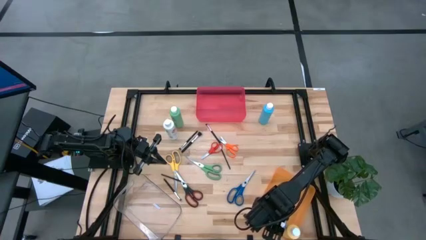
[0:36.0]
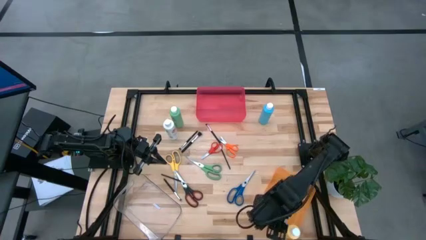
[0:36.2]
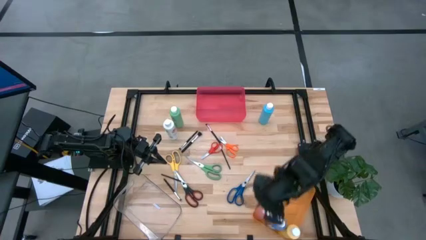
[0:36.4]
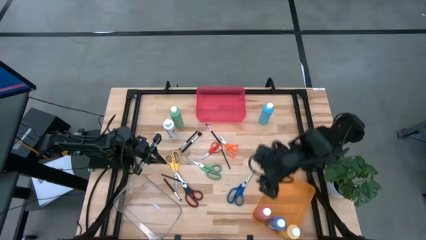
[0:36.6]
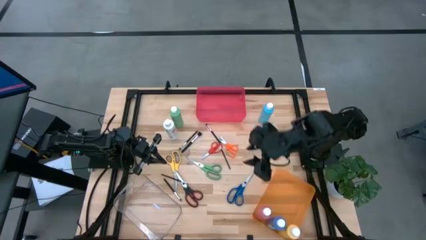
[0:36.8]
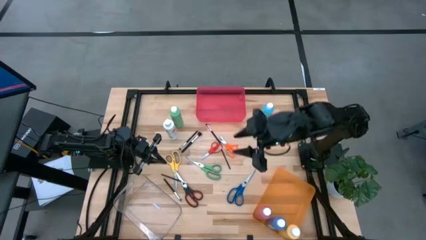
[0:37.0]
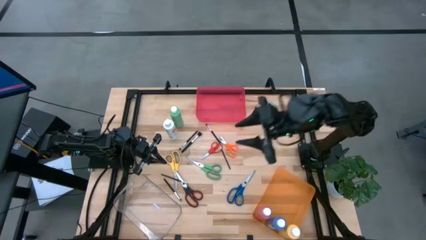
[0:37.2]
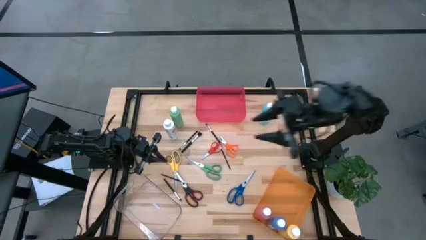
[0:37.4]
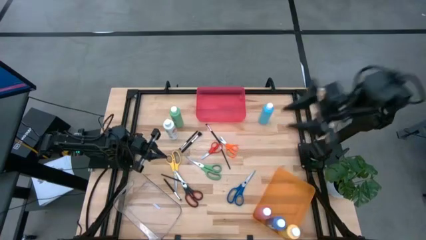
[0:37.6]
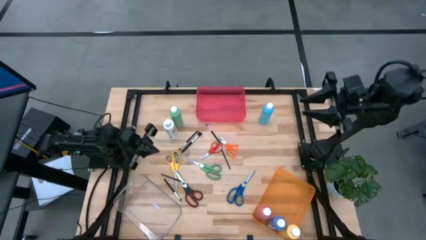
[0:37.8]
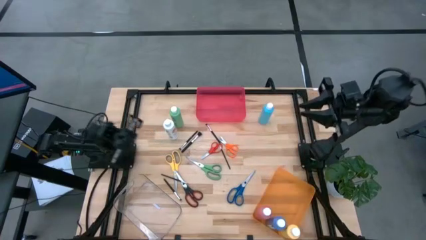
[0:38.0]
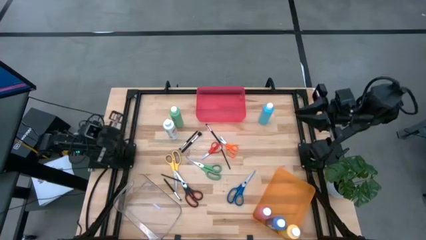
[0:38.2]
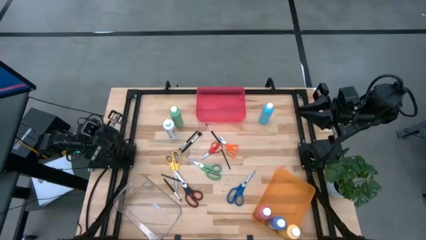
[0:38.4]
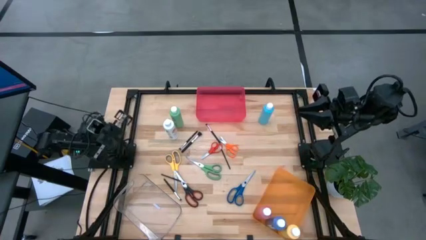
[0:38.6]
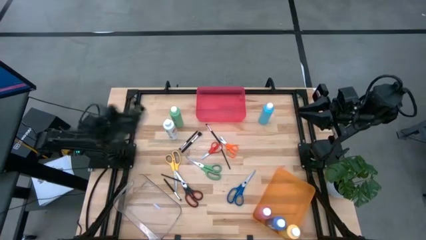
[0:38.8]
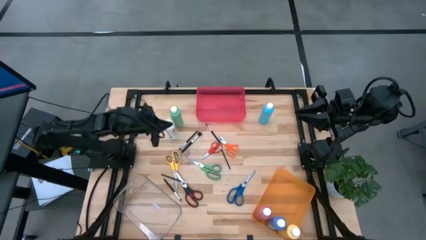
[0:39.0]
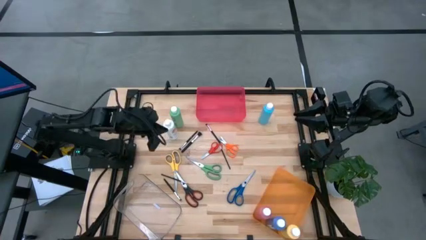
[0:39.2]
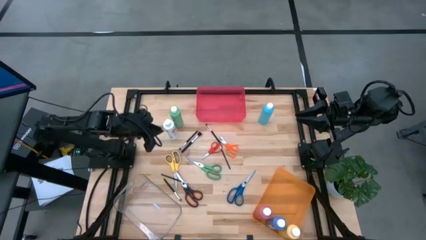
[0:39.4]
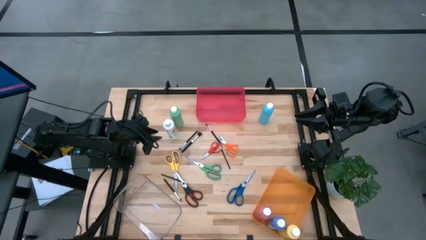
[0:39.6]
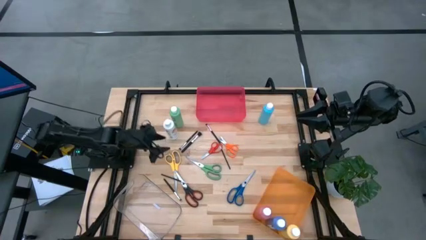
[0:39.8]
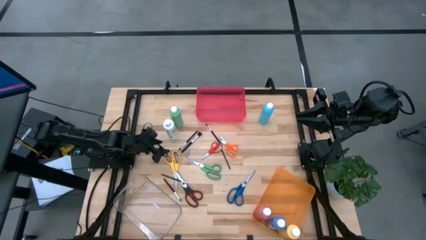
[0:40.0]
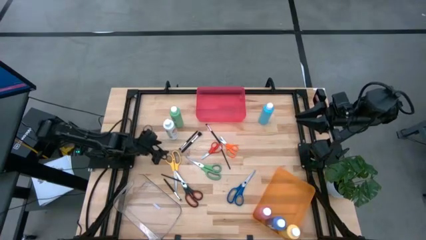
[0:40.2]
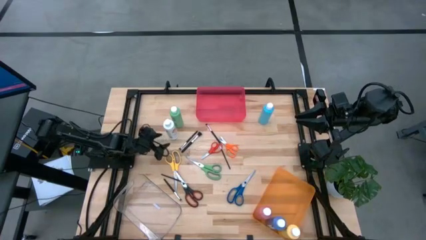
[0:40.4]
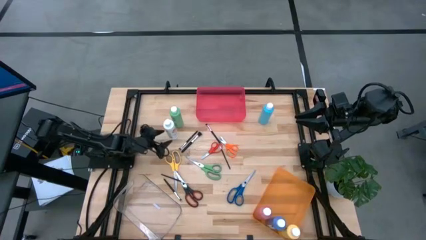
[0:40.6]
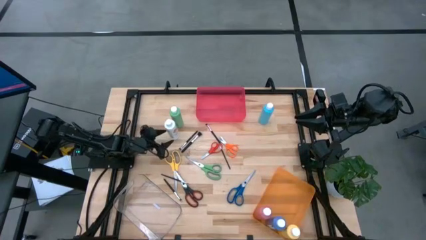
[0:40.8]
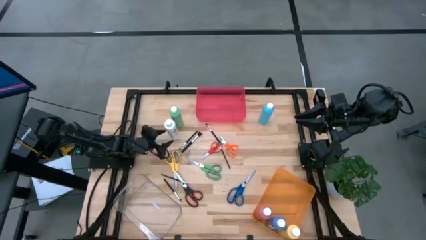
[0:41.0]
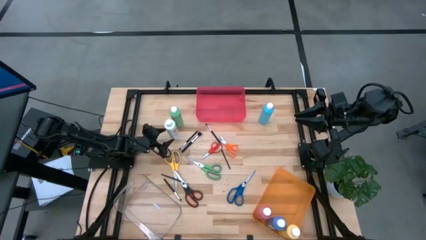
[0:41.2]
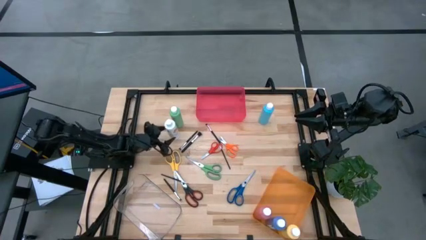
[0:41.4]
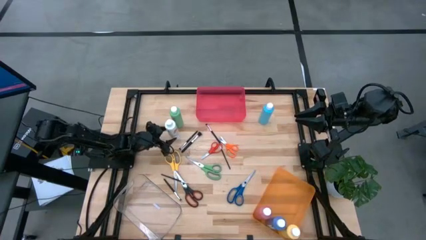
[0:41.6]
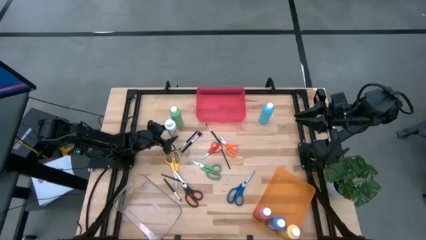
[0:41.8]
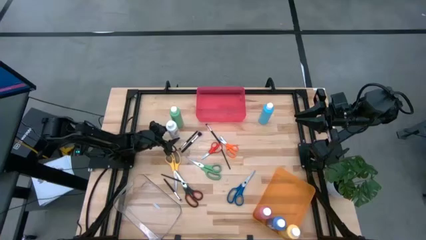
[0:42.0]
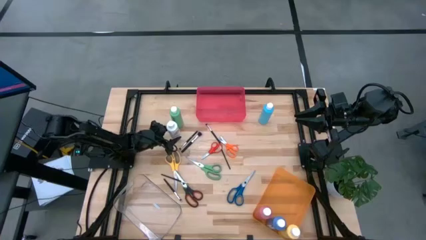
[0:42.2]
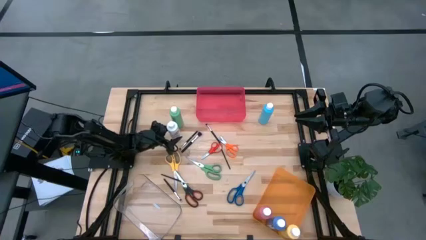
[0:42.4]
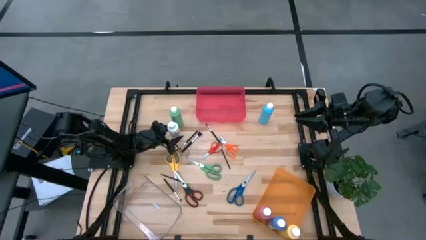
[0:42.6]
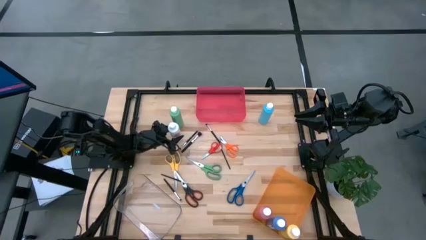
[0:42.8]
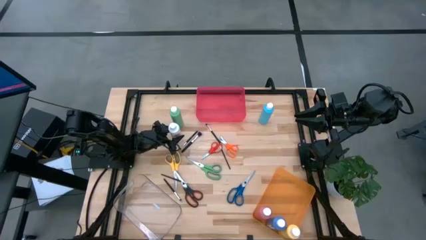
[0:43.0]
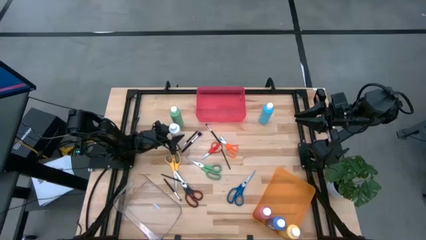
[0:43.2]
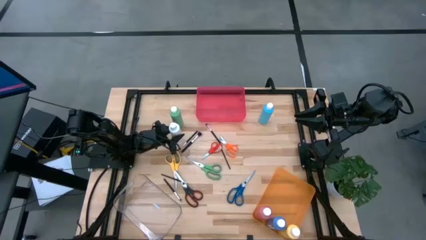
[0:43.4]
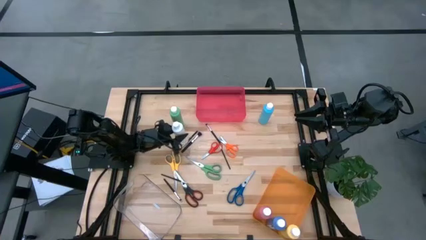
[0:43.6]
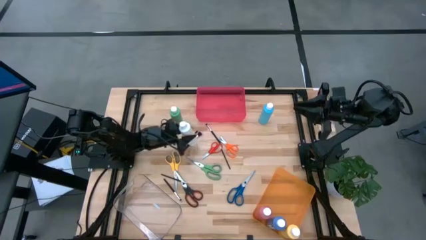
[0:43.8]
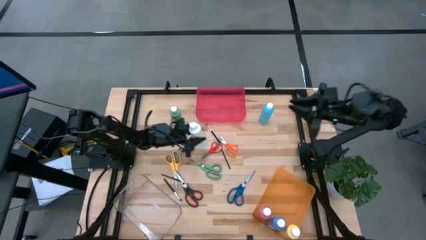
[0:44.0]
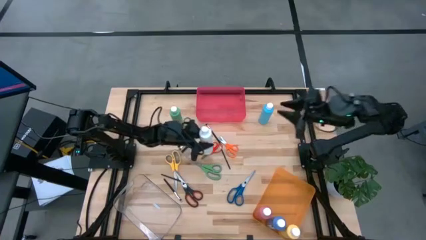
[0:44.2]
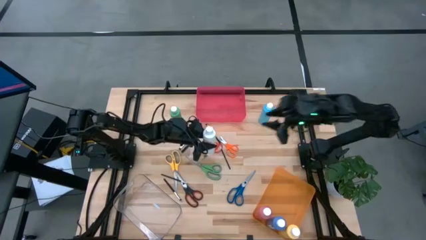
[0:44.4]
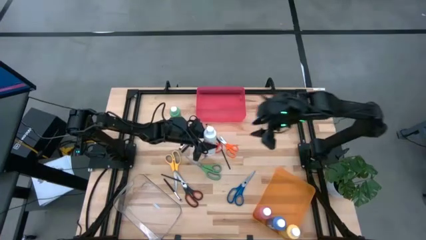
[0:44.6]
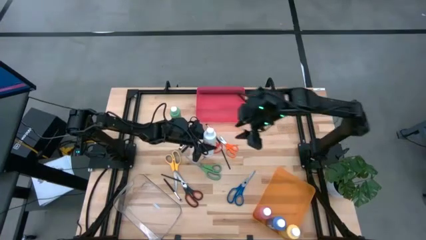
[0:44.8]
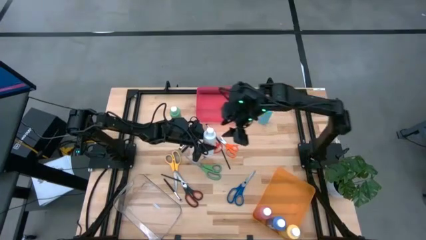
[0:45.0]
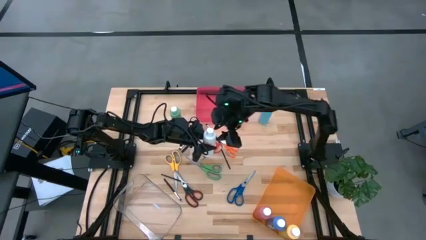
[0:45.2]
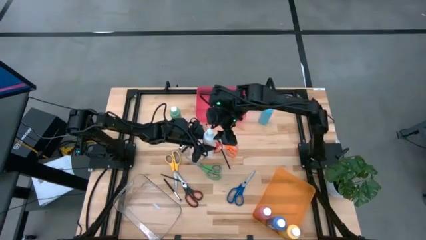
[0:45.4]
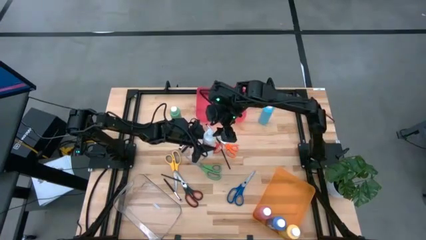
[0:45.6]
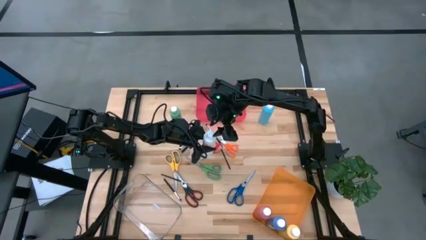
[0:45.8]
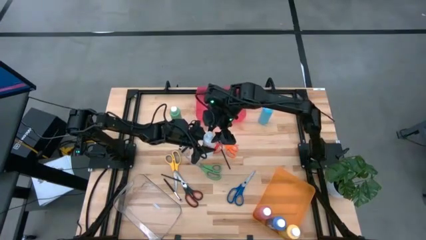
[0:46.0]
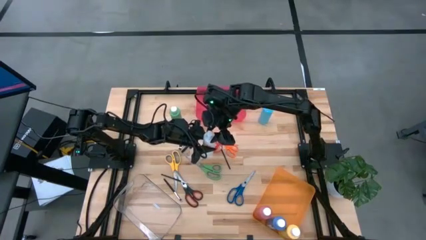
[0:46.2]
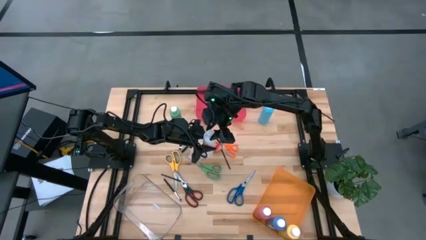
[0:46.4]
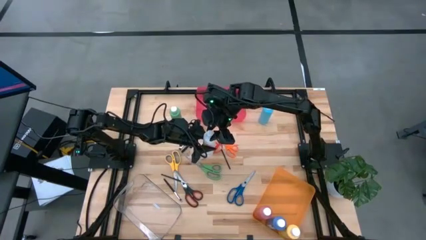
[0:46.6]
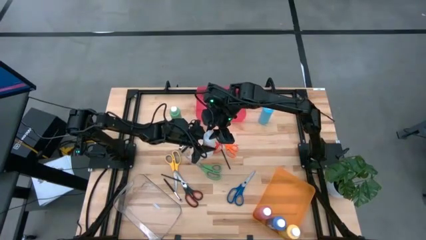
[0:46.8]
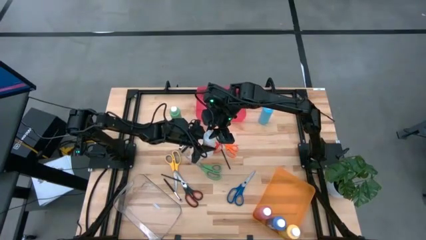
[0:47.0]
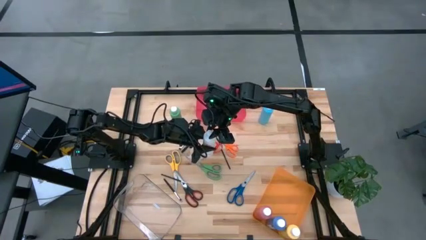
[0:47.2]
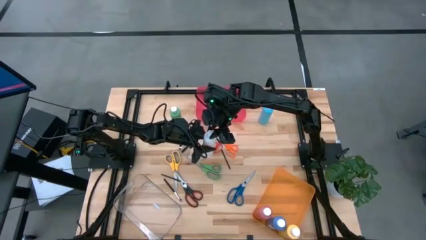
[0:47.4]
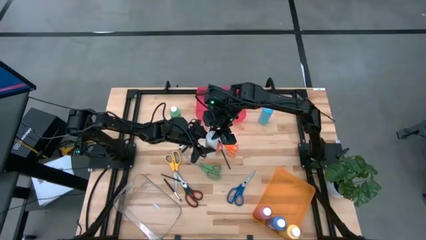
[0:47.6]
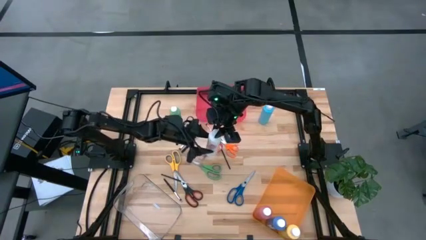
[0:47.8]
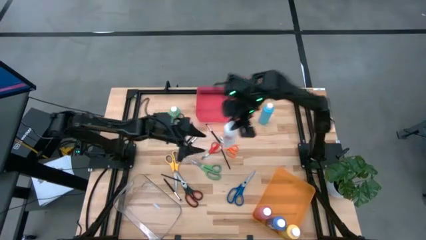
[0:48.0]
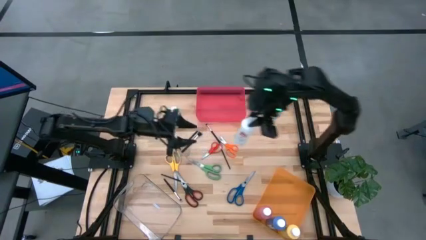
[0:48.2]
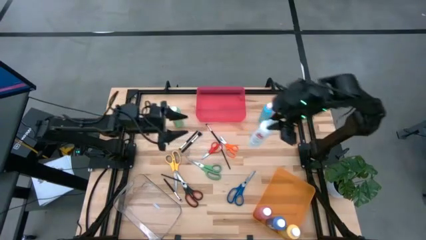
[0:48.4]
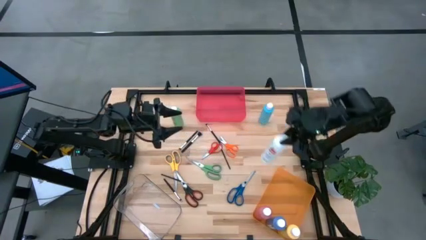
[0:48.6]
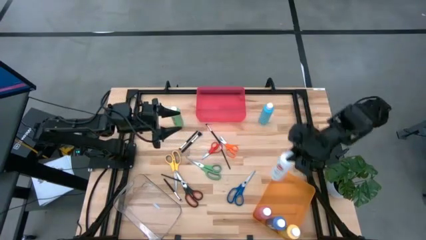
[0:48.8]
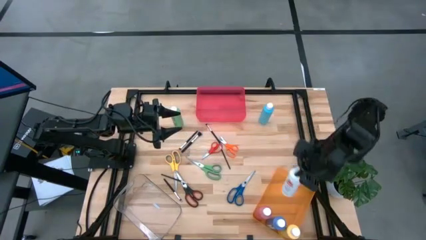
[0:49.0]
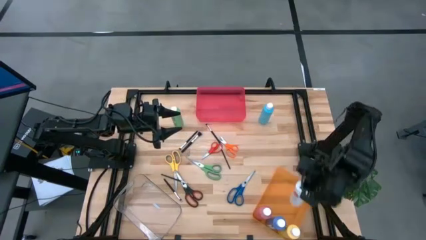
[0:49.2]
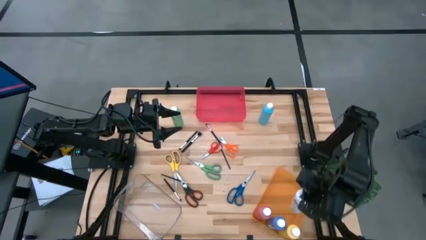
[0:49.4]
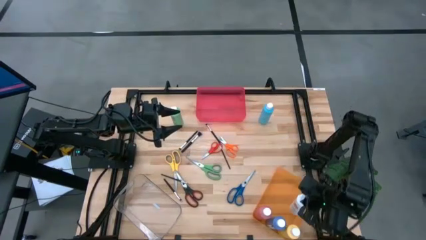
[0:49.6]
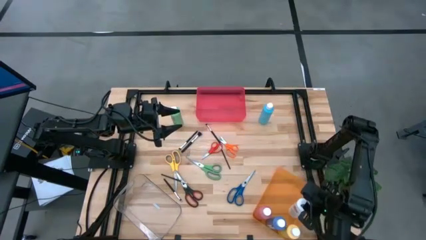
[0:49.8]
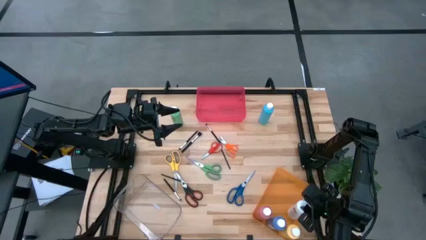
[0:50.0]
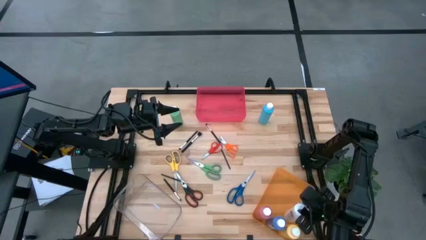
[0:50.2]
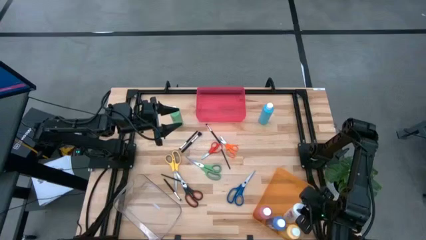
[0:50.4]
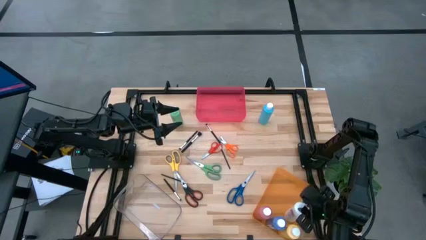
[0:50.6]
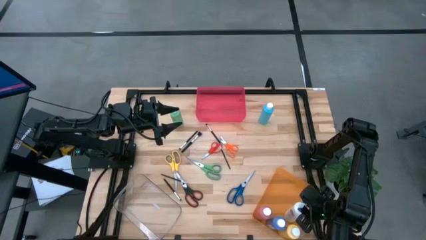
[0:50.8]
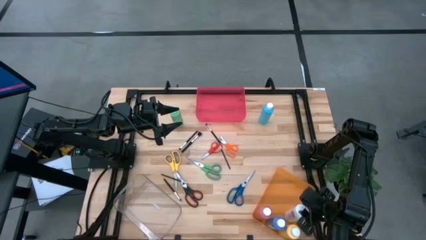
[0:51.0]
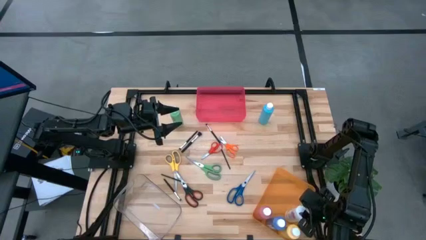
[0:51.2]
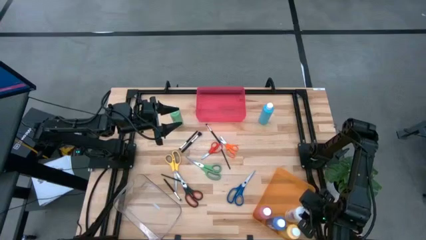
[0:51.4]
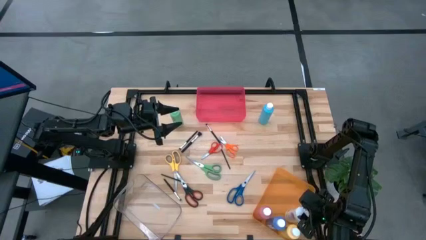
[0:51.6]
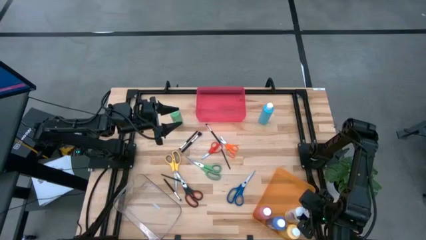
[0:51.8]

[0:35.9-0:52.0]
Task: Pick & Place Paint Supplies
Put the white paint bottle into the orange bin

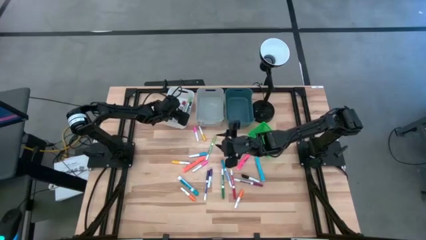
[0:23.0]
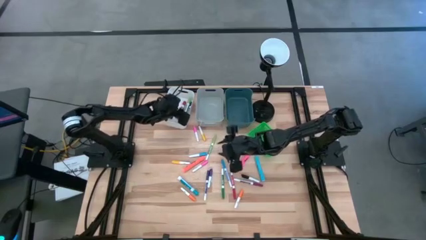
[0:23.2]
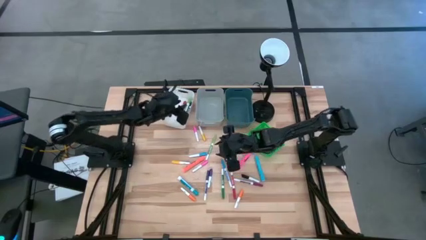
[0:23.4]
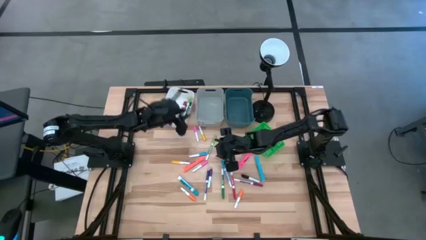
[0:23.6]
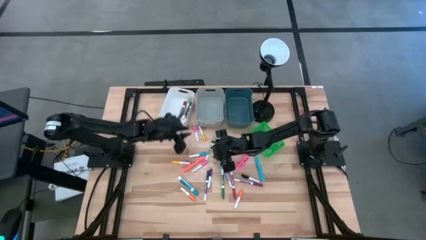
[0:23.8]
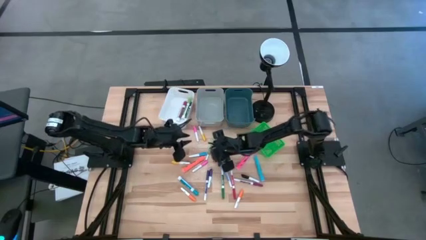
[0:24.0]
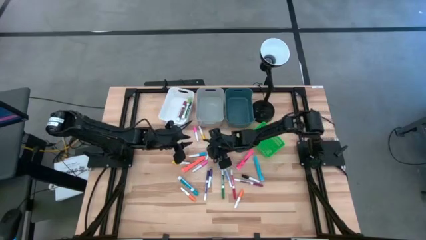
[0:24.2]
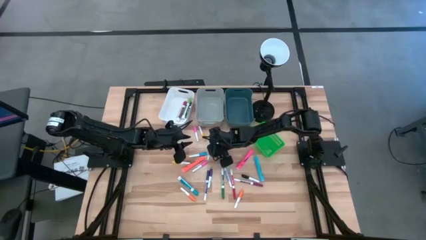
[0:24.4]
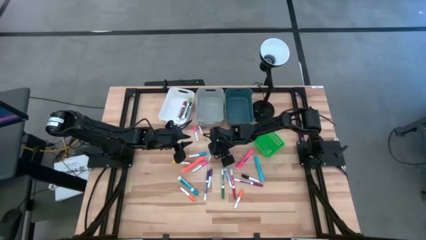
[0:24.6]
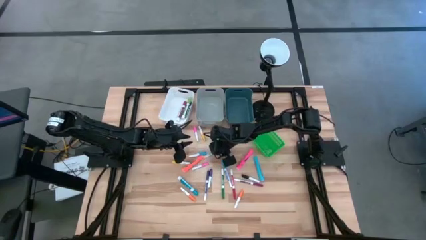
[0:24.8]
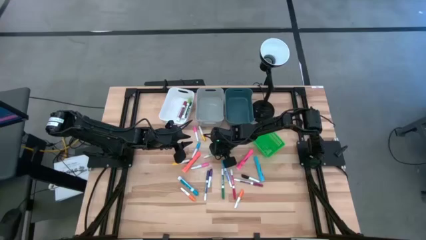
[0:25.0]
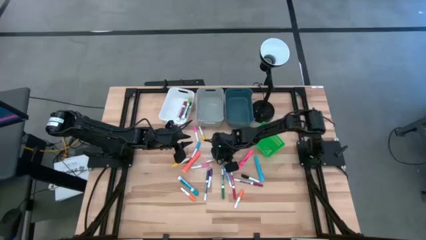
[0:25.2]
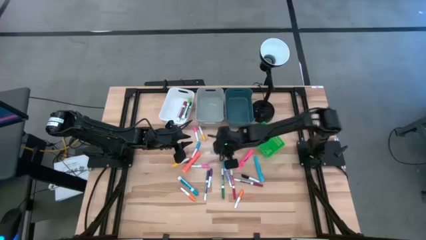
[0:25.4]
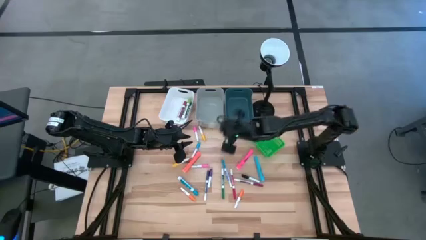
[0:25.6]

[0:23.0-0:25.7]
Task: Pick & Place Markers
Put the light green marker pen into the blue bin
